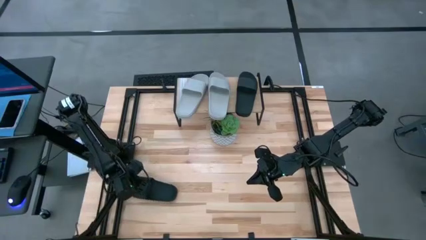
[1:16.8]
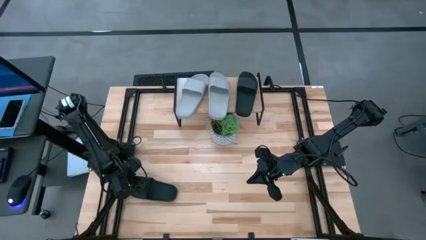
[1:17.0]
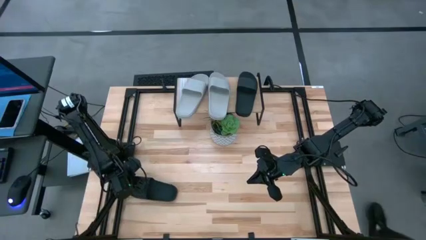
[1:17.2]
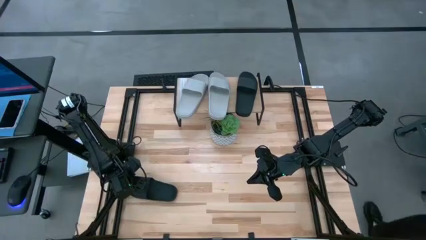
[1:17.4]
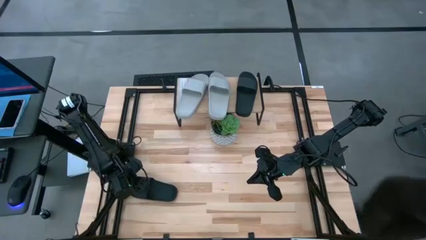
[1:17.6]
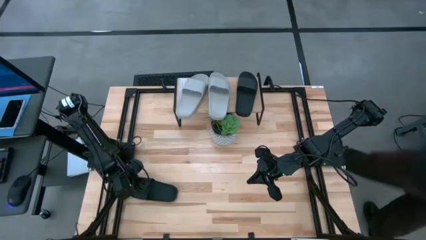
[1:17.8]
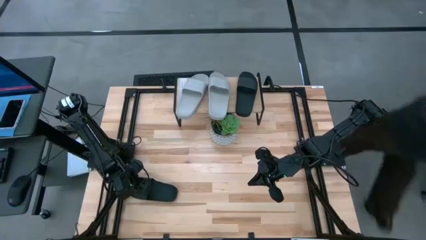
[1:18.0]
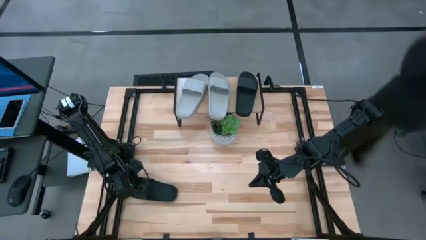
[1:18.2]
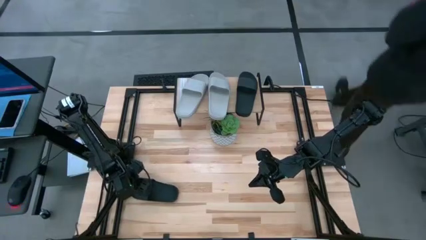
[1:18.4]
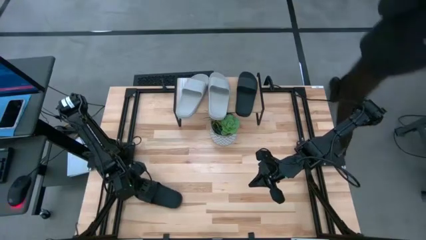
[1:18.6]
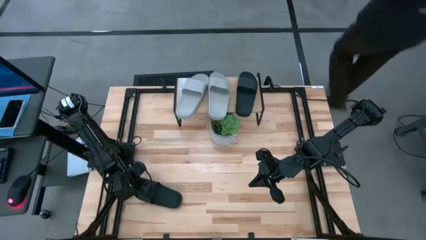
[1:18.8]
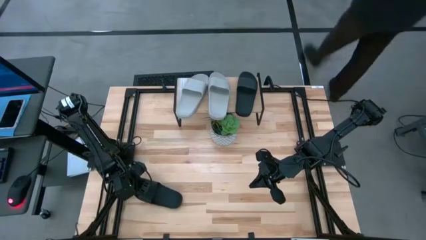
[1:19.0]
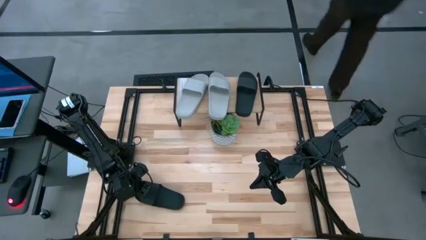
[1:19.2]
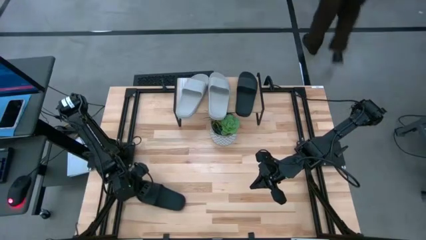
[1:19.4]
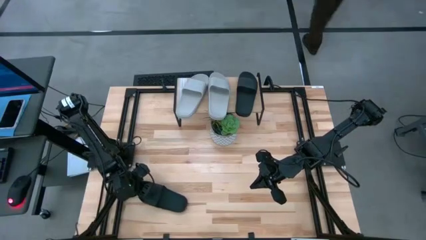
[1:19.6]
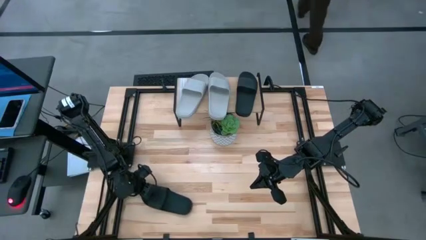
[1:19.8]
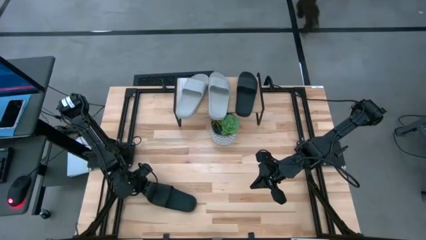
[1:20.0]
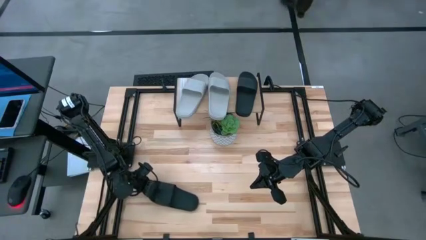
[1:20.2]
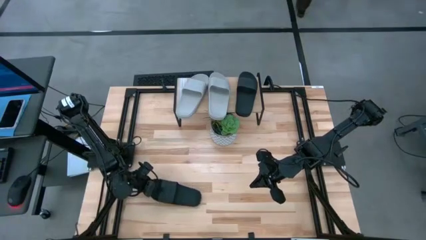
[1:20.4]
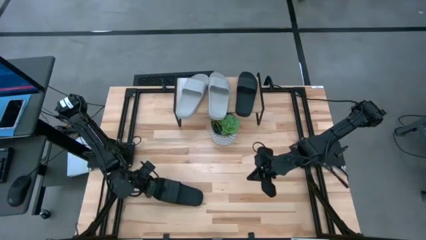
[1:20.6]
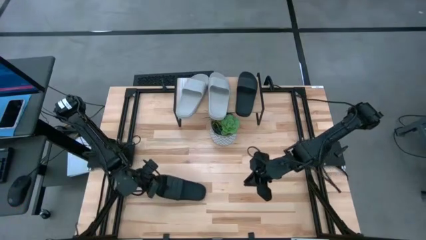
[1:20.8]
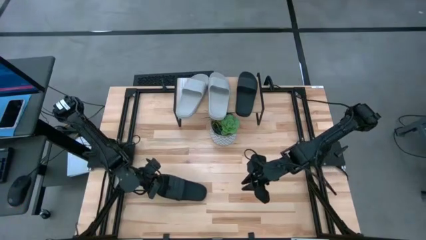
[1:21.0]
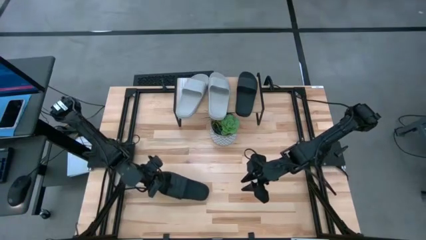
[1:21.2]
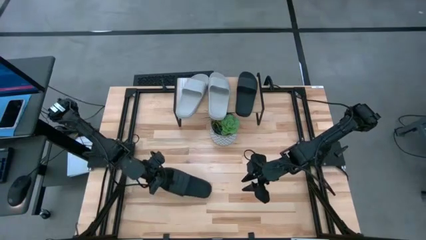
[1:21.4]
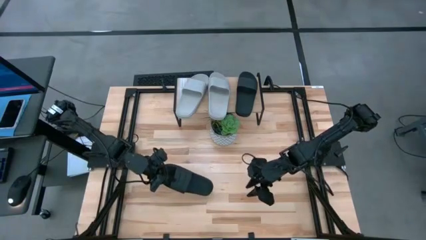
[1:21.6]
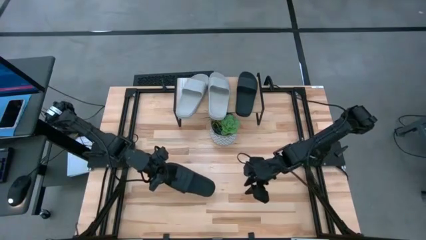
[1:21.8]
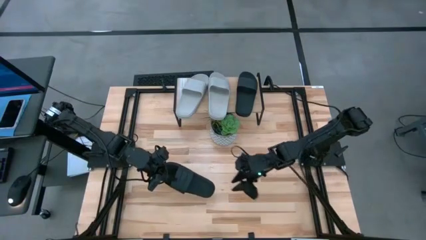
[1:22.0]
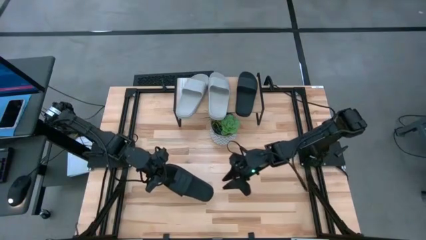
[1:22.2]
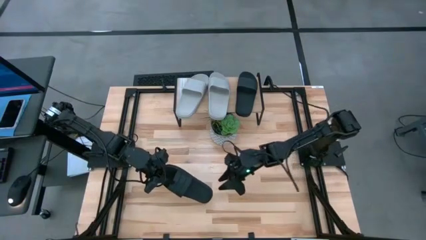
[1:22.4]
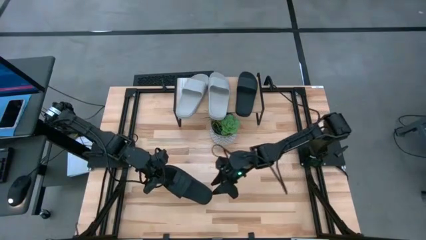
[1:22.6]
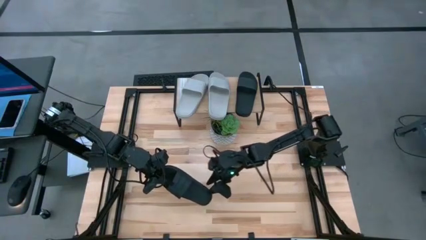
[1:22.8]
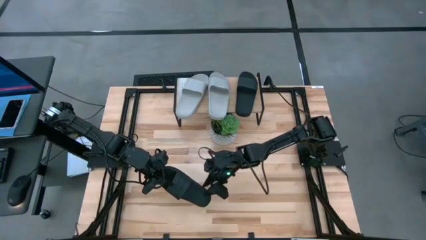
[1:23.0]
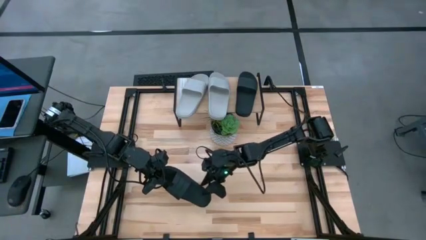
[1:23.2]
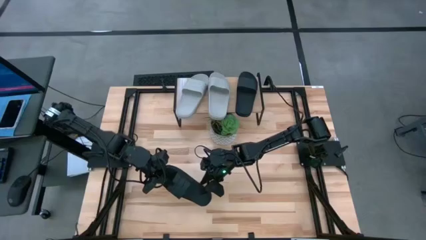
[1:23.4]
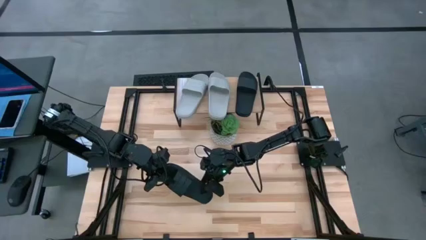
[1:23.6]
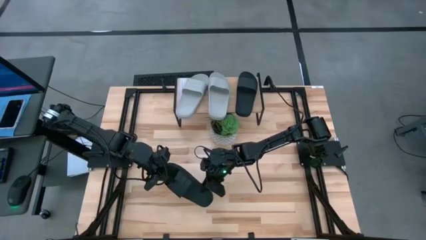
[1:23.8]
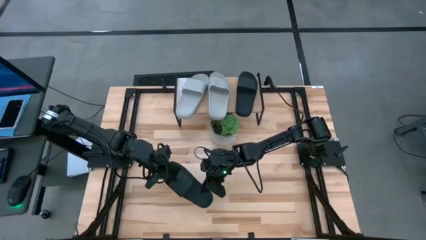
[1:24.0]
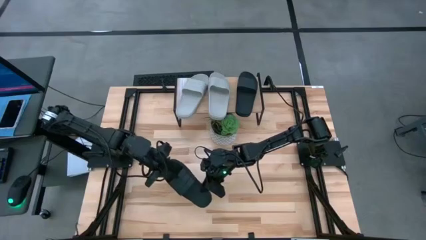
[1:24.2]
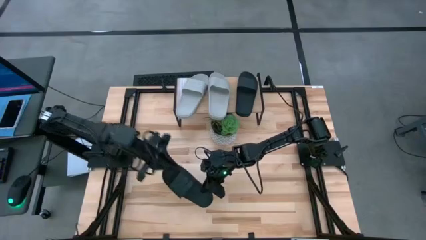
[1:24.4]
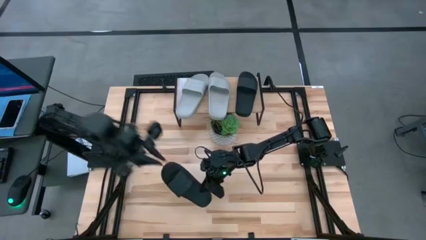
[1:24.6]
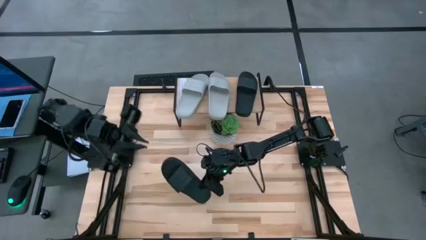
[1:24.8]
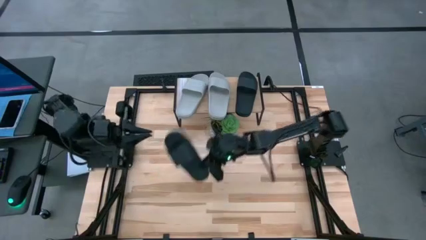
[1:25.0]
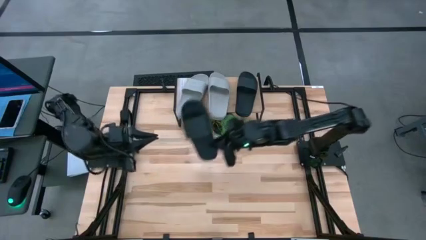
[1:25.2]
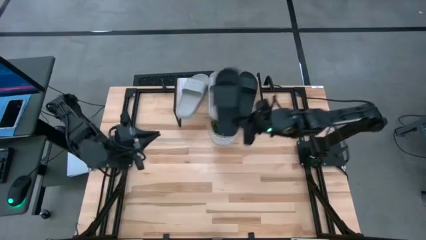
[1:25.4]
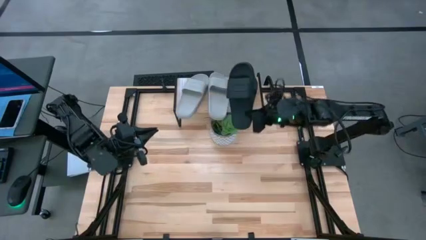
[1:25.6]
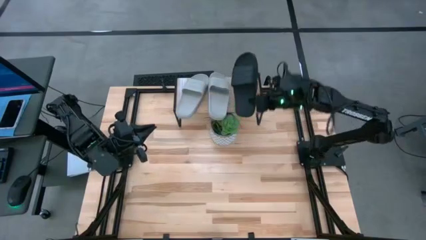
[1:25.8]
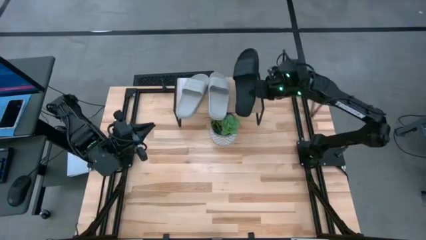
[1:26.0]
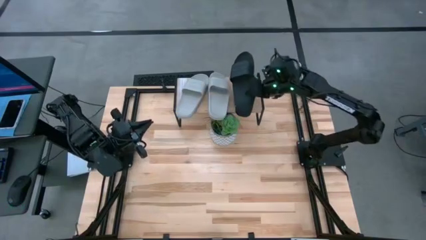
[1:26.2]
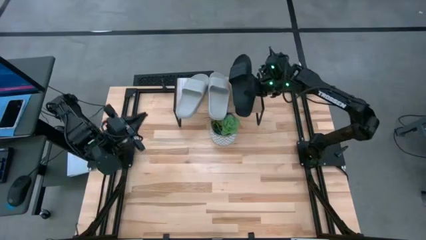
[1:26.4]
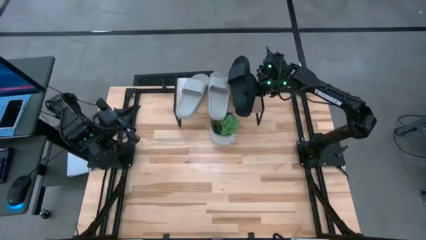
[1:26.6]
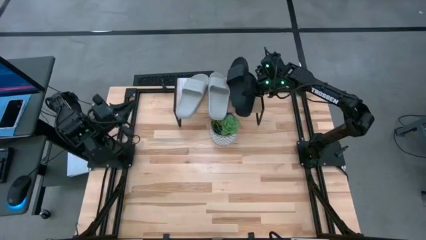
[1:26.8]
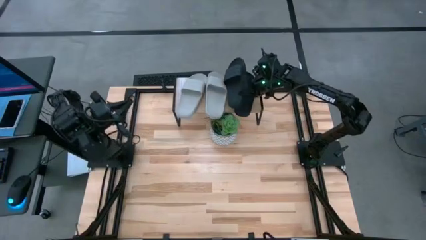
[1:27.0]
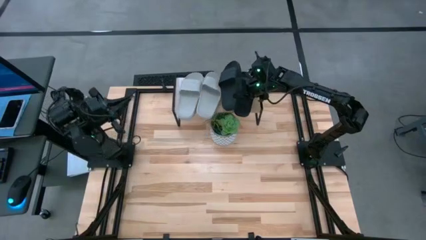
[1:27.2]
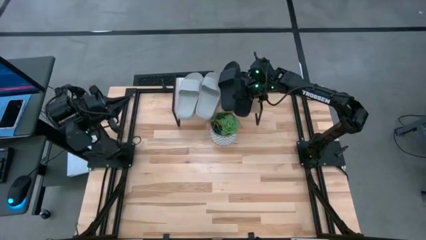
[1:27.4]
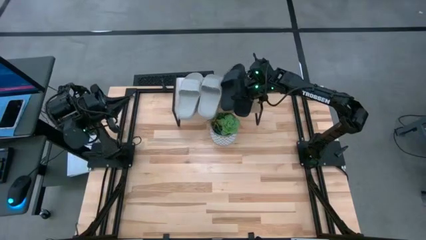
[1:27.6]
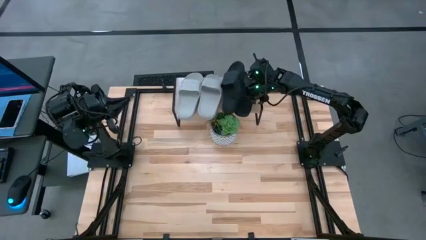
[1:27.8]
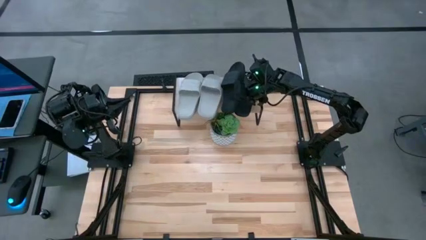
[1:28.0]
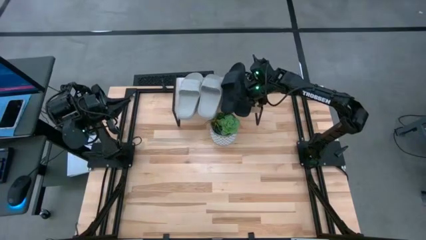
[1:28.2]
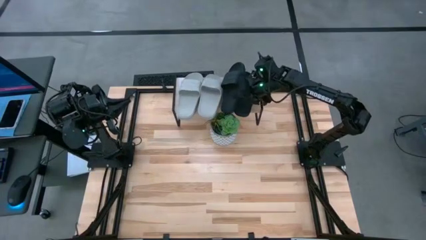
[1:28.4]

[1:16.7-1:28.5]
Task: Pick and place slides into the shelf
Put the black slide on the shelf

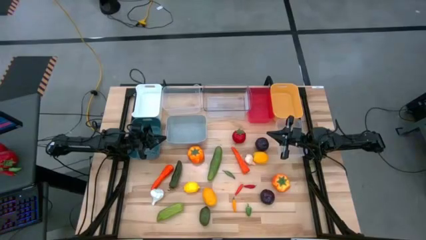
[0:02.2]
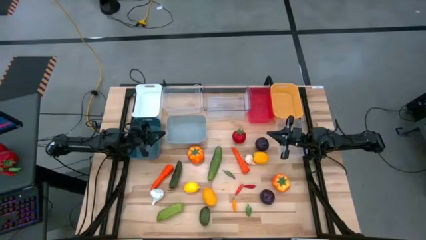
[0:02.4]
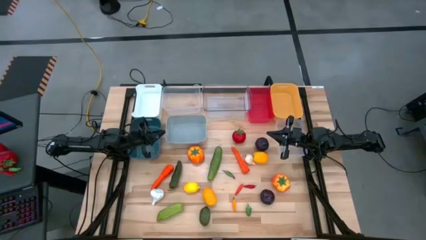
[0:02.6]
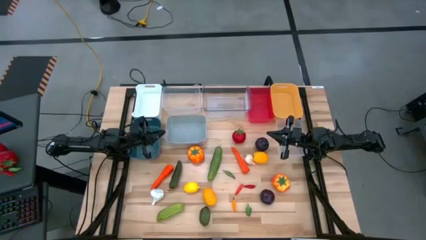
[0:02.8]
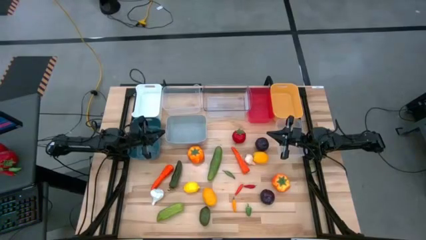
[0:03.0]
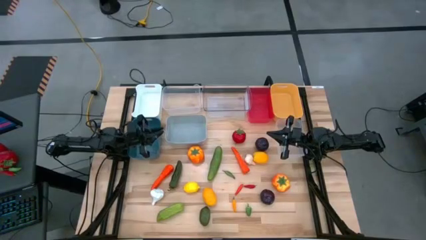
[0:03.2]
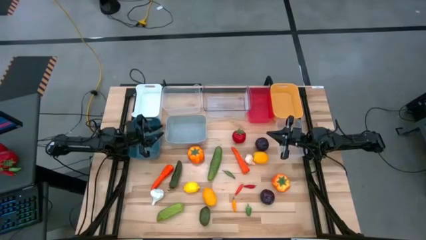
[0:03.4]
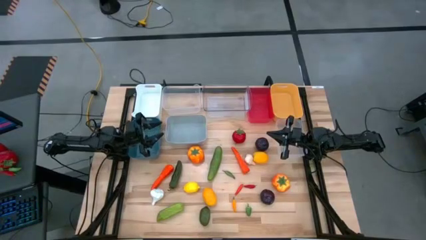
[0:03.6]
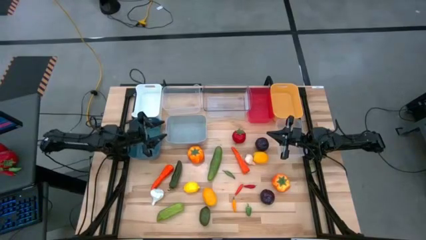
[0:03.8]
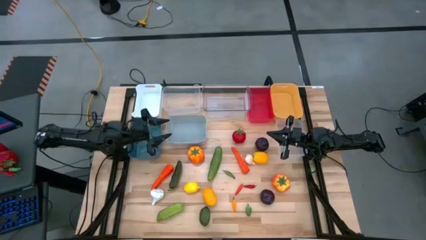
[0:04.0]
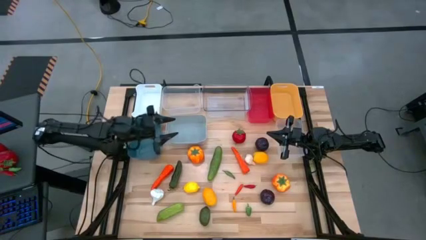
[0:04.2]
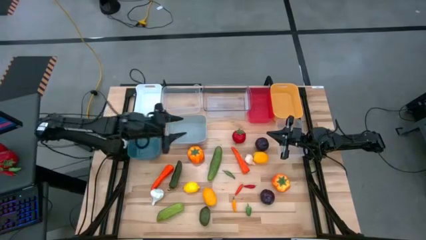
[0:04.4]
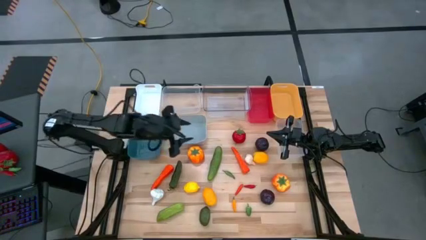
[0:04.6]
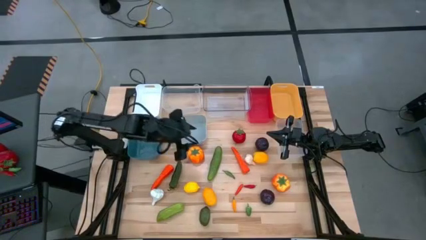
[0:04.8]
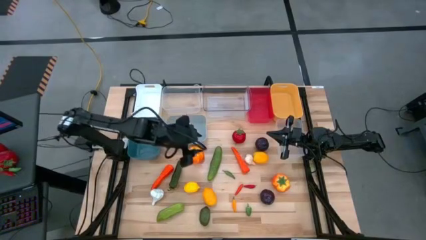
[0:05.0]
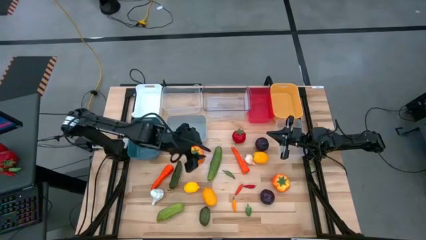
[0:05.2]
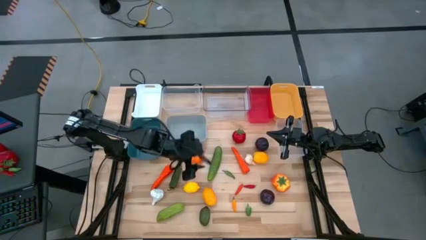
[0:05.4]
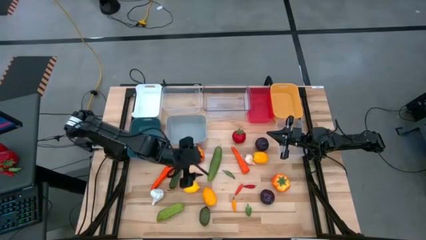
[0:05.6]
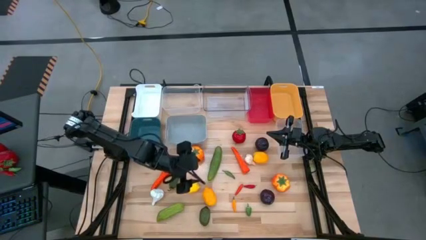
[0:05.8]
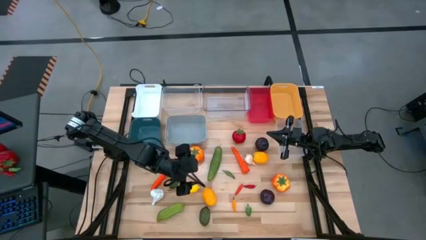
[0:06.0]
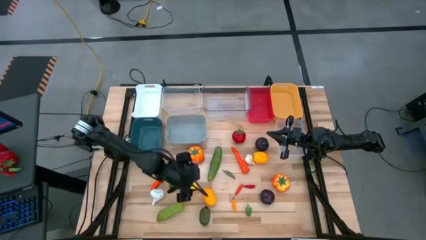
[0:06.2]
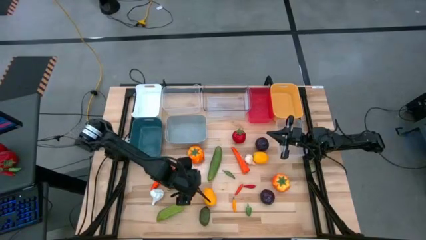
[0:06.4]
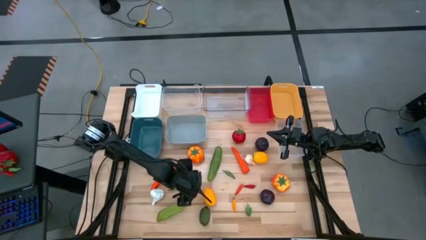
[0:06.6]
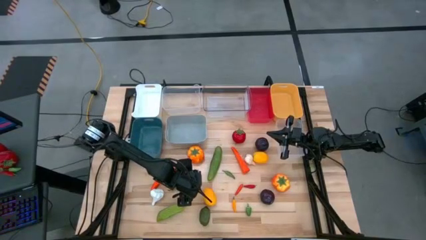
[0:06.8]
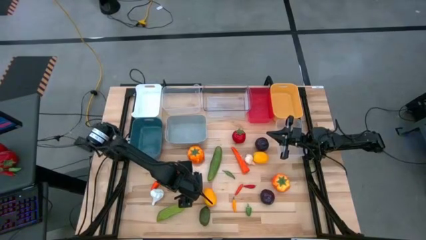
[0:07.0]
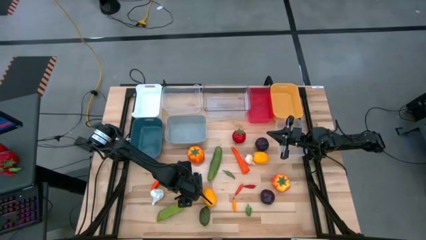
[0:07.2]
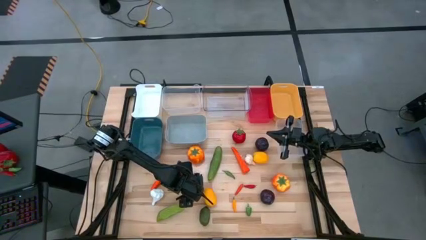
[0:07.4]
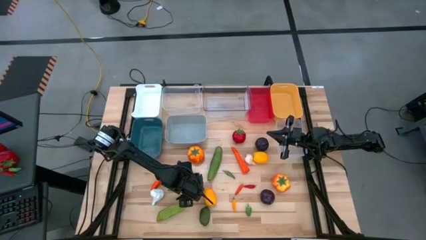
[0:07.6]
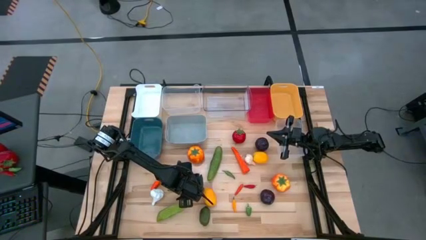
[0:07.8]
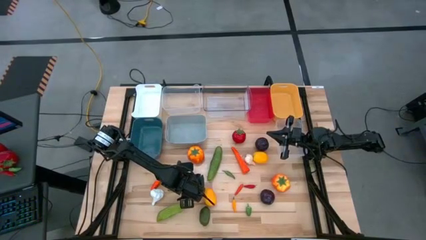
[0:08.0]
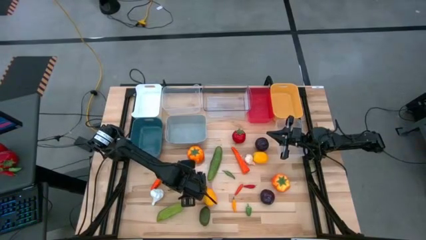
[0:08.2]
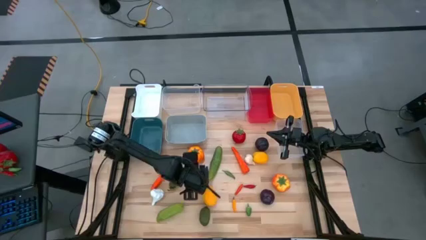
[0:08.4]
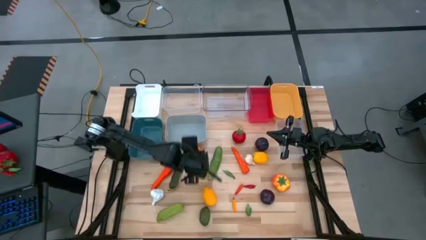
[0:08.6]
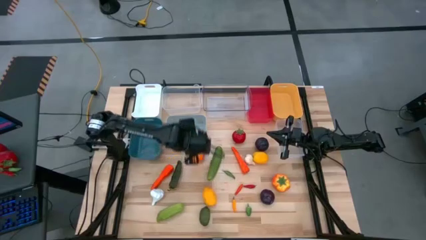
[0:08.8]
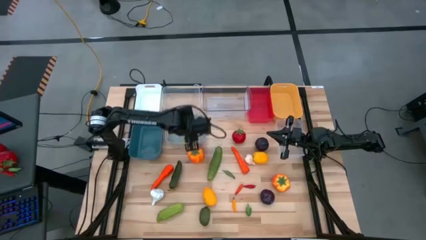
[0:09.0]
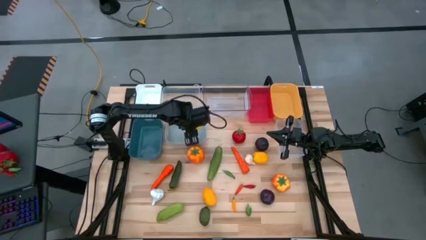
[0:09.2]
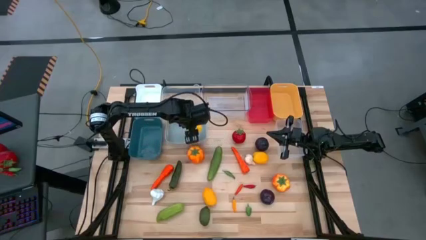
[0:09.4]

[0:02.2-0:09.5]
Task: Sort produce into baskets
Put the bottom left lemon into the gray bin
